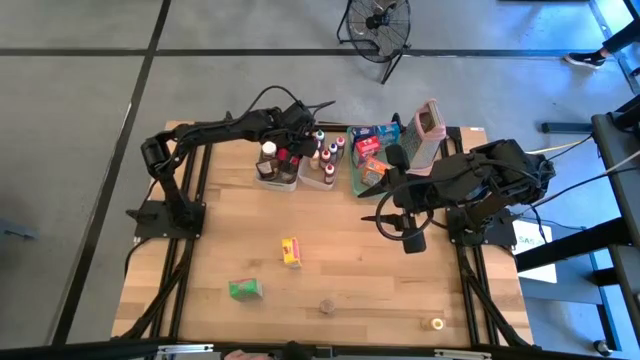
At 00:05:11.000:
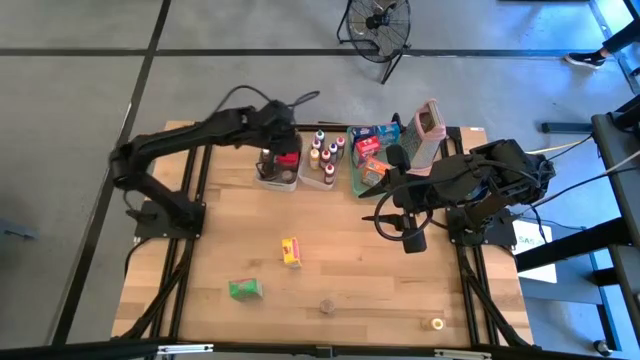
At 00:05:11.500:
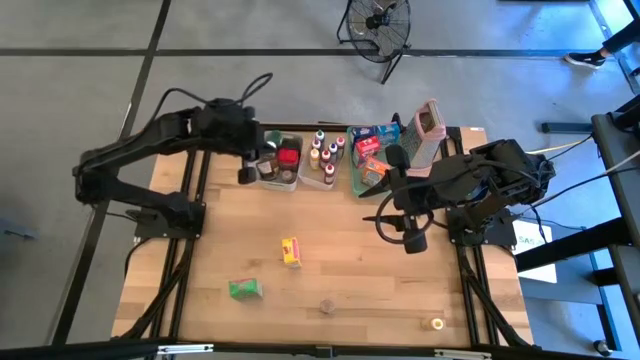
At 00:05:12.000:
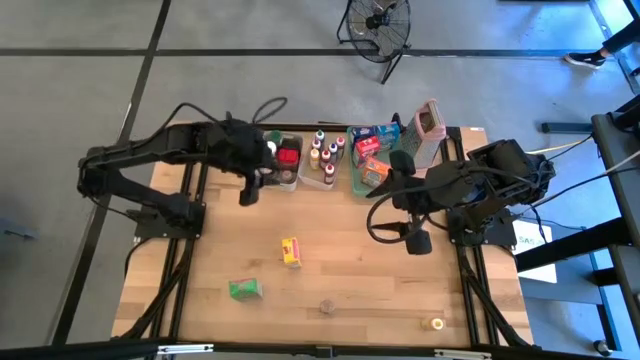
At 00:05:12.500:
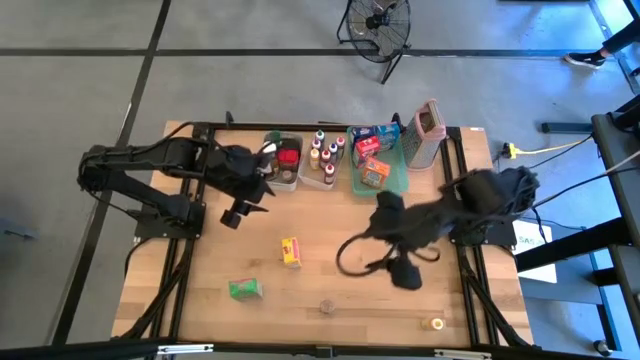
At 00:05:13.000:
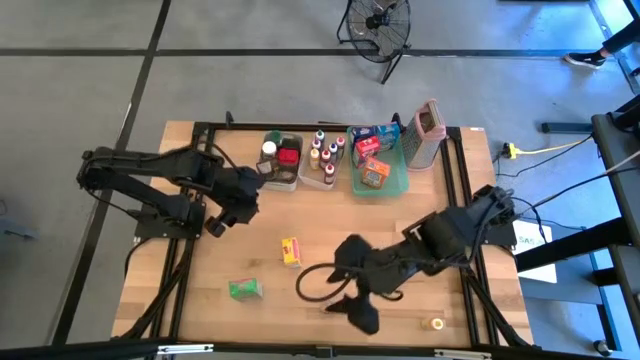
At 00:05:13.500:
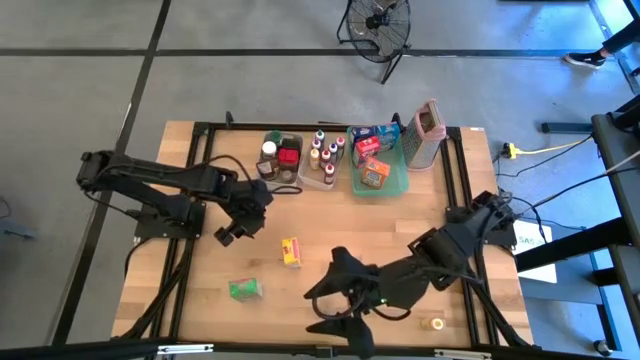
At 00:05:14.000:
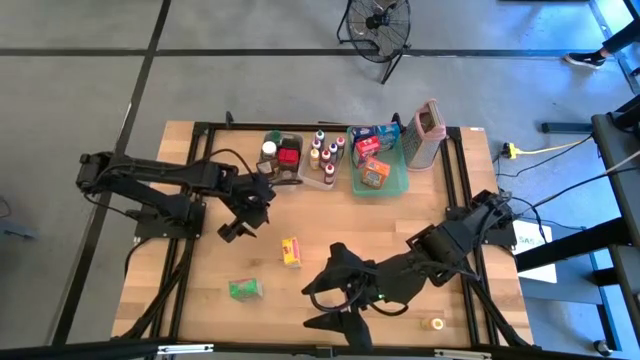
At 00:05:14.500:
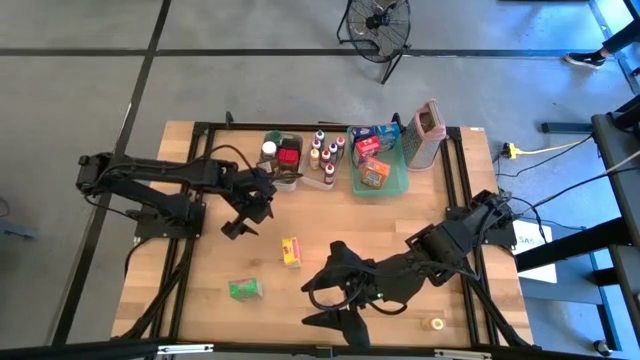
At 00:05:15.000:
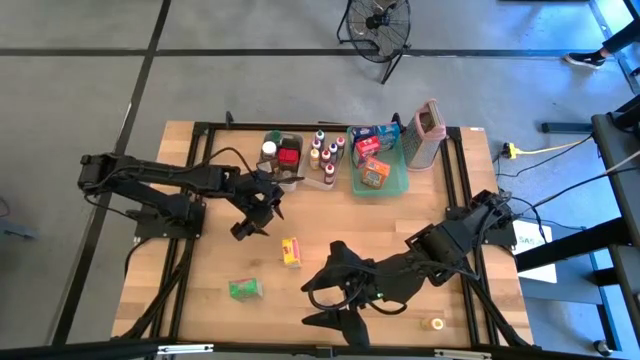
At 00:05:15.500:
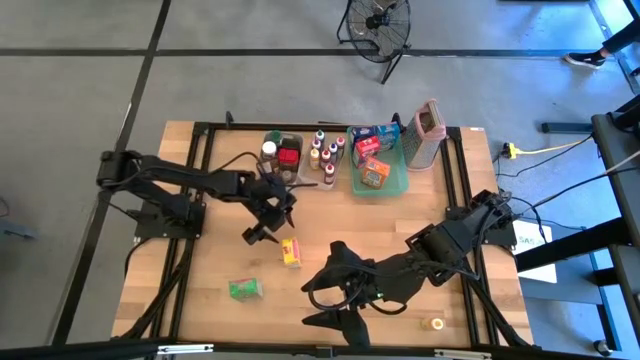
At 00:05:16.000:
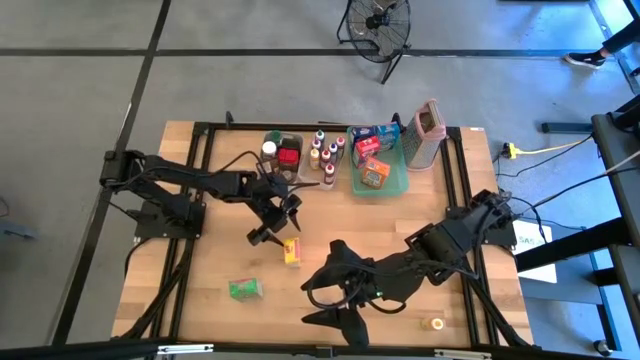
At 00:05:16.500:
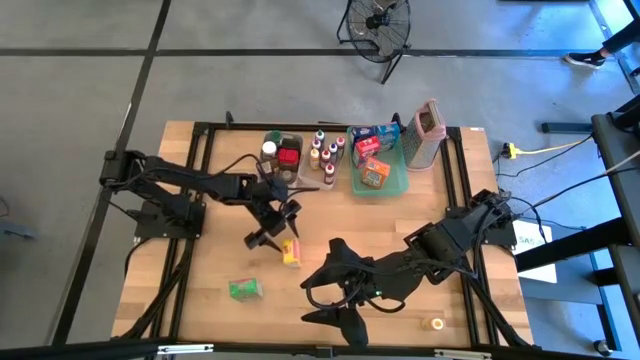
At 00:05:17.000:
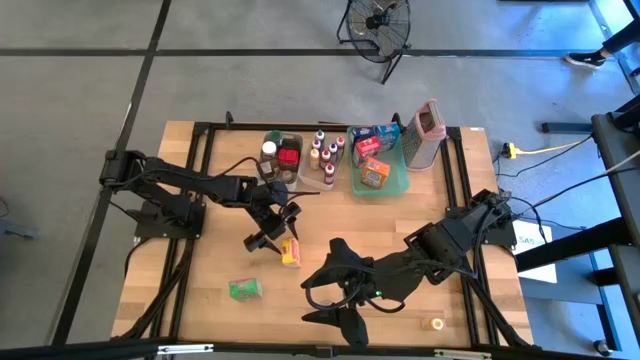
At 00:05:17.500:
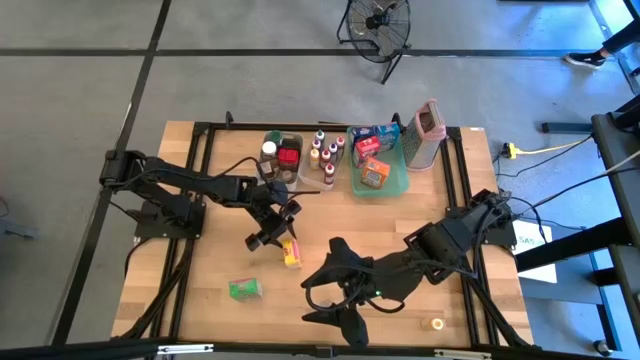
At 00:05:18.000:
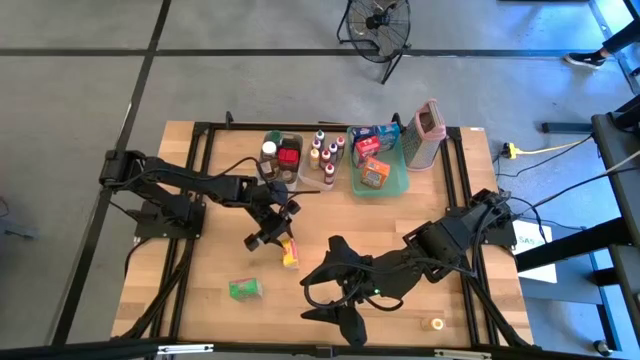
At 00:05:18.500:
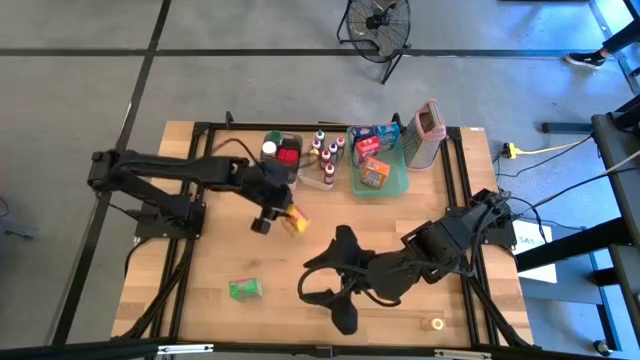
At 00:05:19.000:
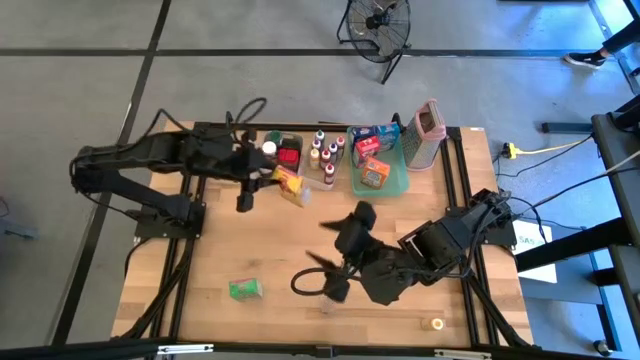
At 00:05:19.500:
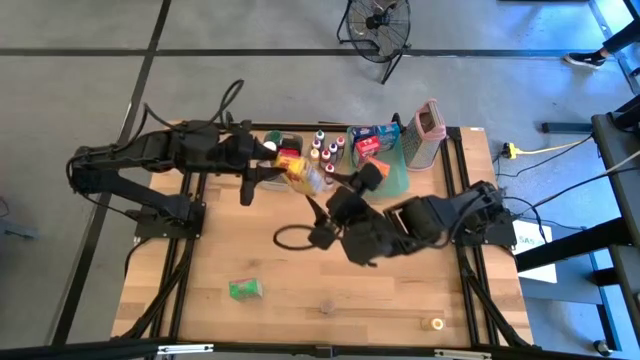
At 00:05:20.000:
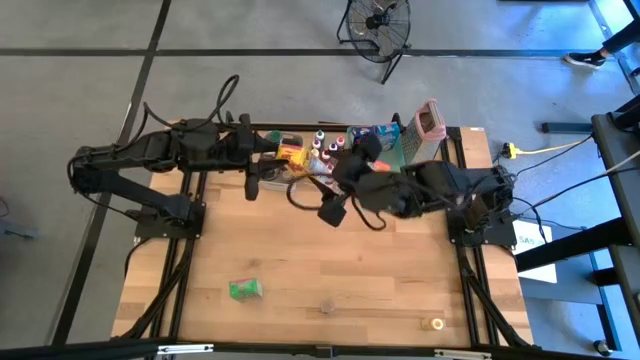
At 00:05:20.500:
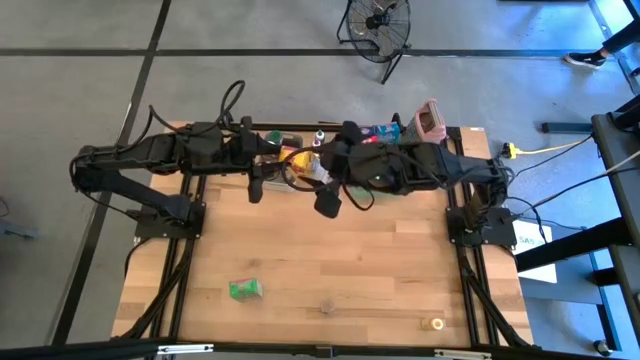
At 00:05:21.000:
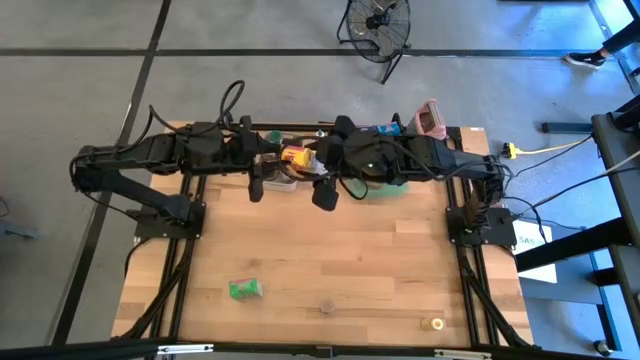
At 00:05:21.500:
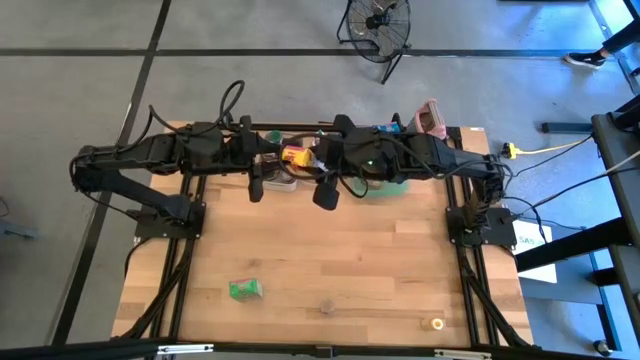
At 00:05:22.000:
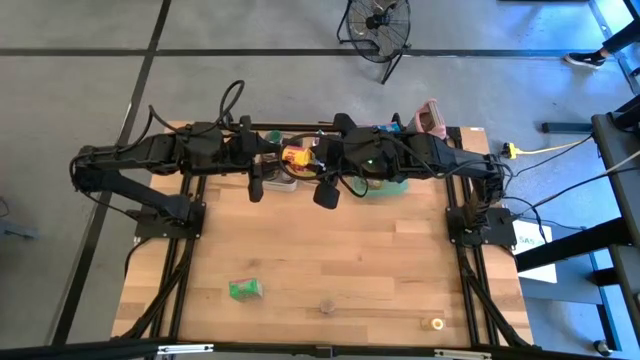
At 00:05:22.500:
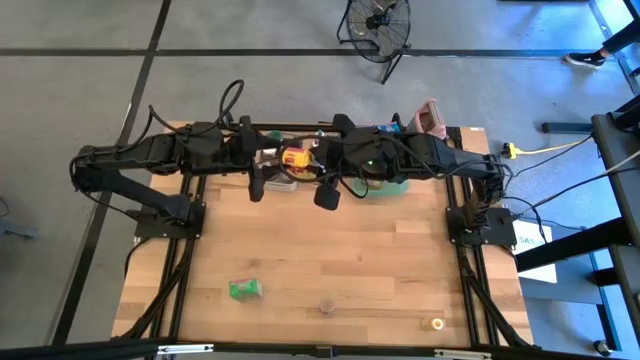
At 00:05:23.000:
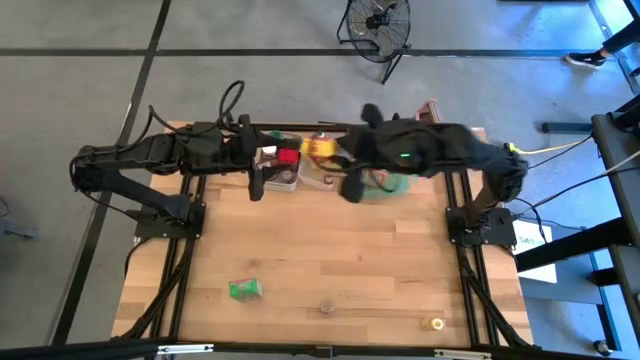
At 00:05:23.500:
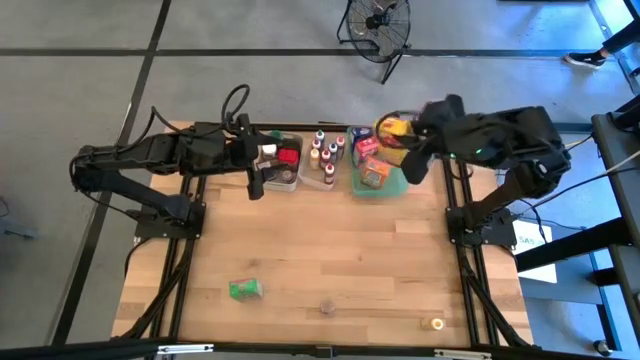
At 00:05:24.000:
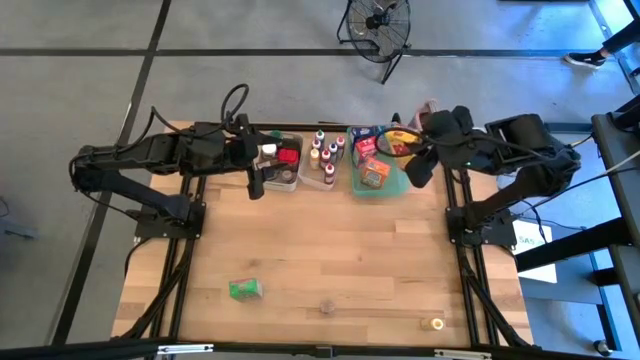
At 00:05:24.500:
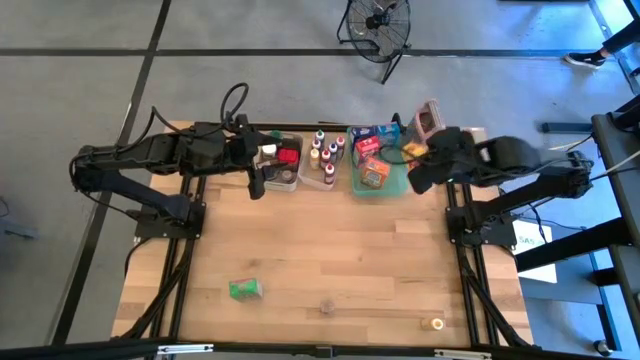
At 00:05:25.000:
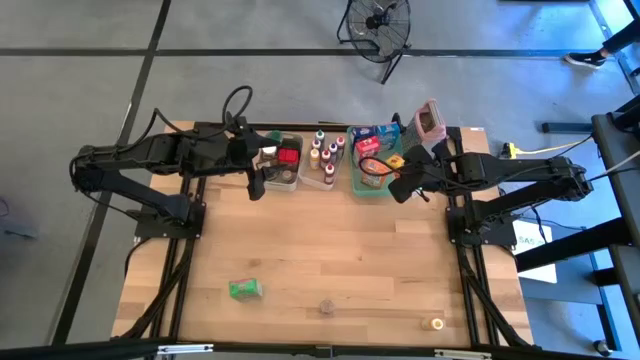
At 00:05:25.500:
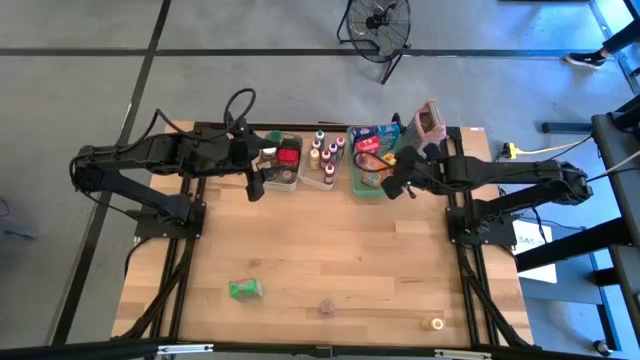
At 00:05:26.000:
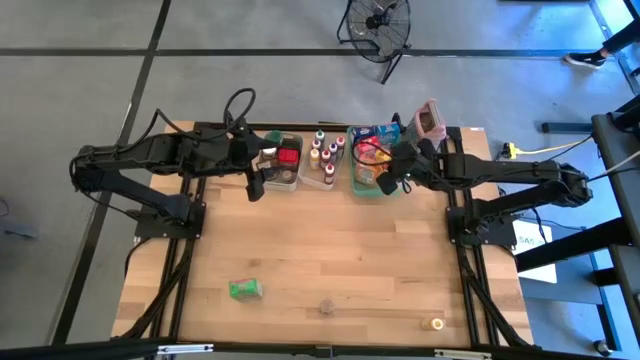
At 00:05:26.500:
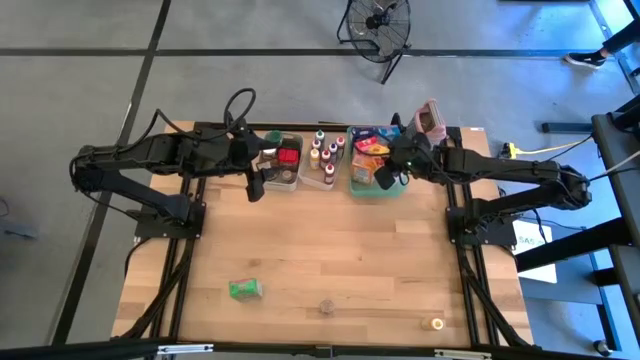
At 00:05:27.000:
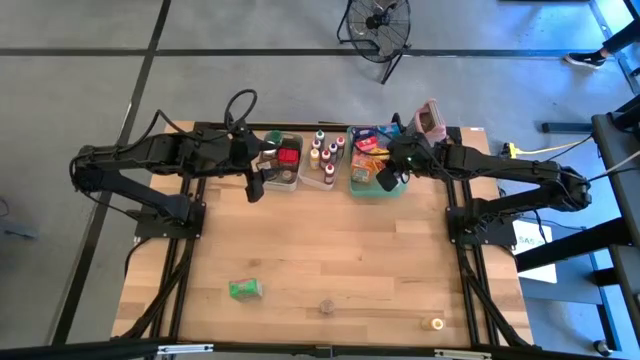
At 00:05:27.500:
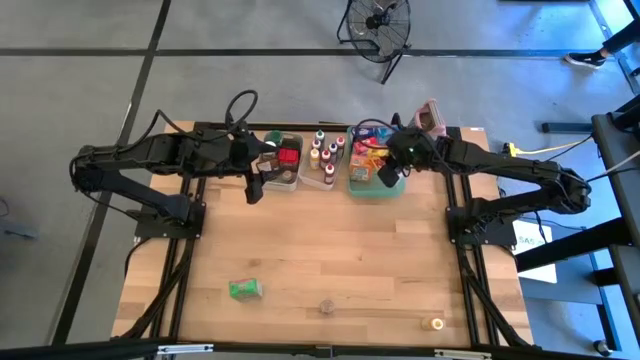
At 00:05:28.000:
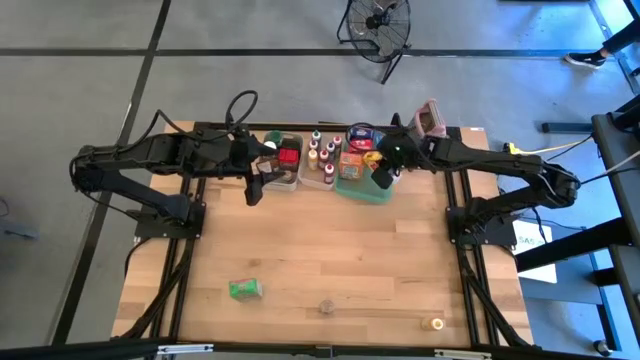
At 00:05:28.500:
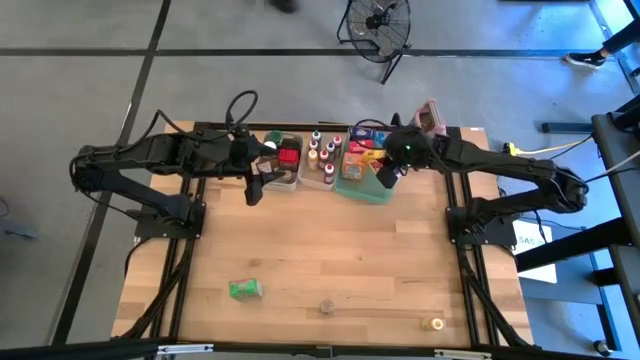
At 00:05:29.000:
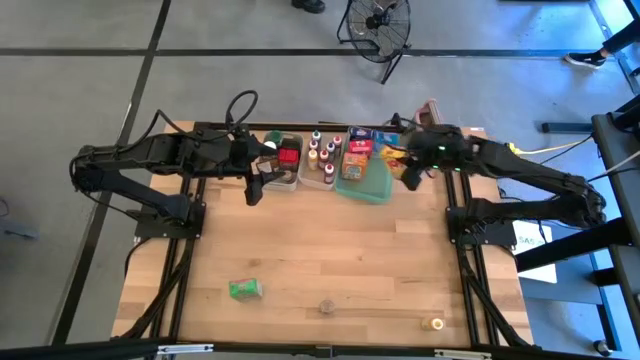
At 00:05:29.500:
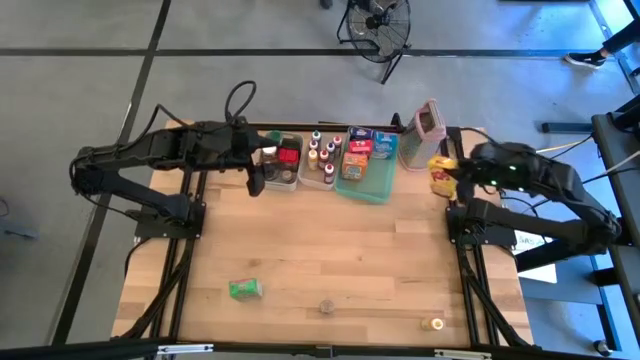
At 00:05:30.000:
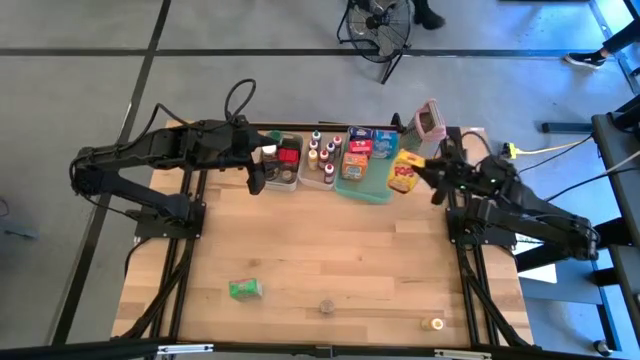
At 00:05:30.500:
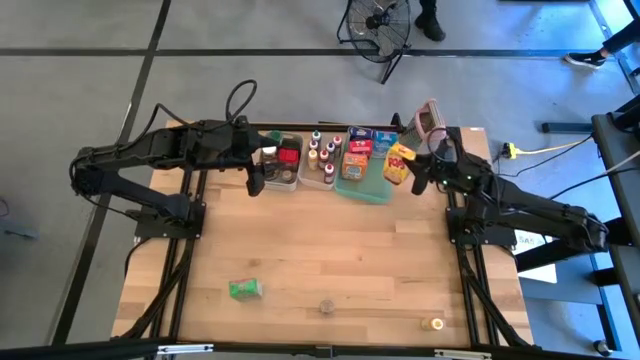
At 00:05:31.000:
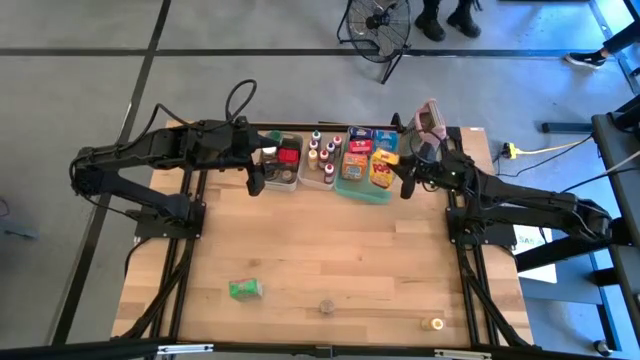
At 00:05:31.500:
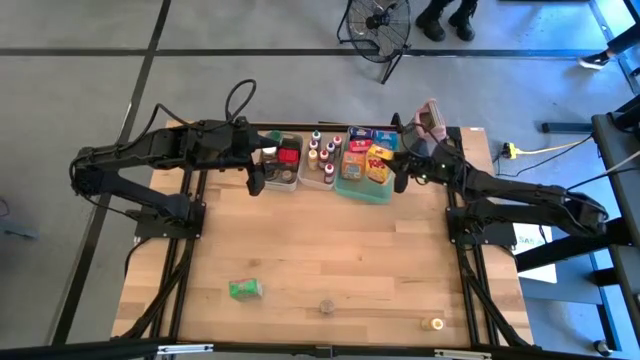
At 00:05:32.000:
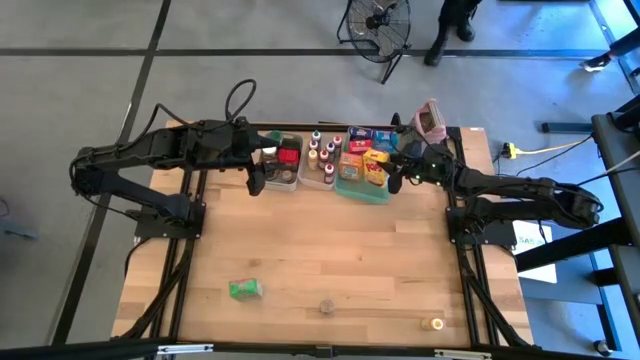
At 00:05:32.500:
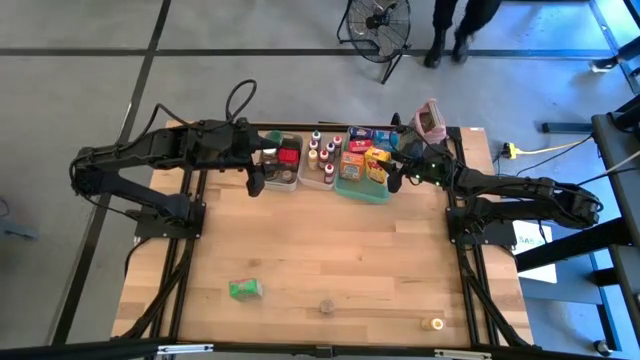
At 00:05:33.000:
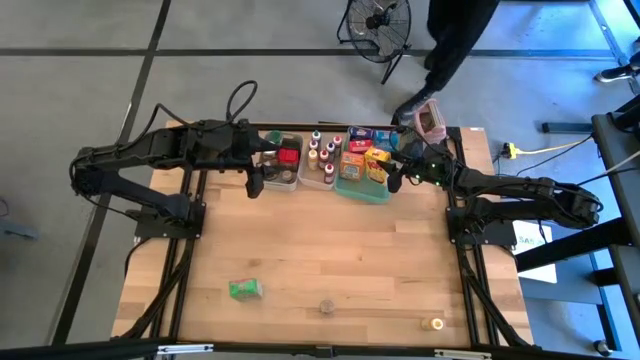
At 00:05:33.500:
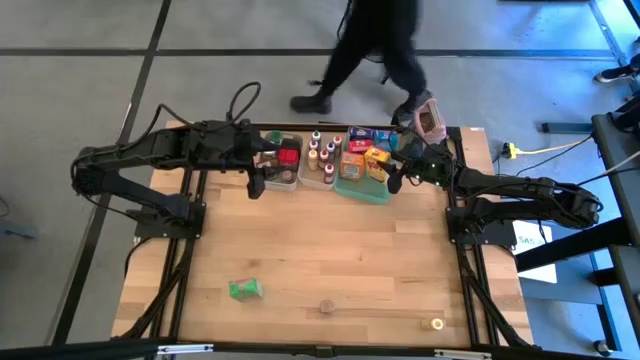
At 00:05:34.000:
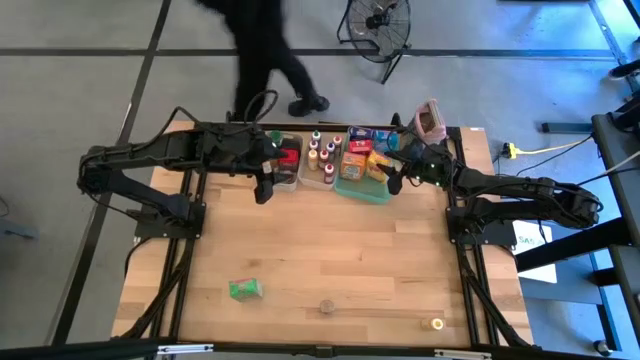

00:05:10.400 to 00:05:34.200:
Task: Pick & Place Kitchen Items
Put the yellow cereal box into the green bin
